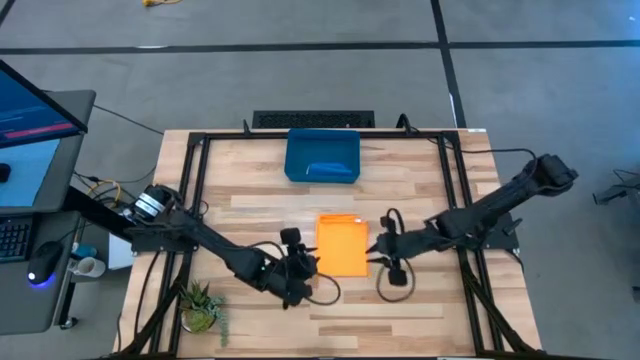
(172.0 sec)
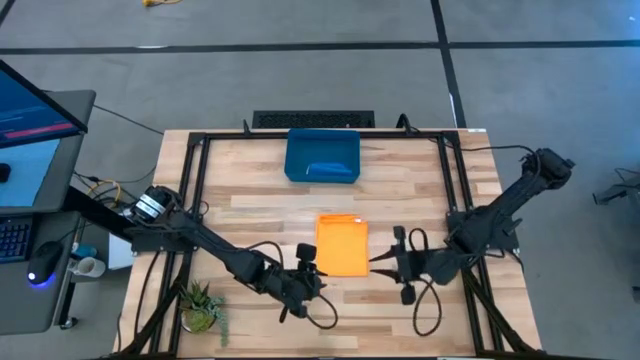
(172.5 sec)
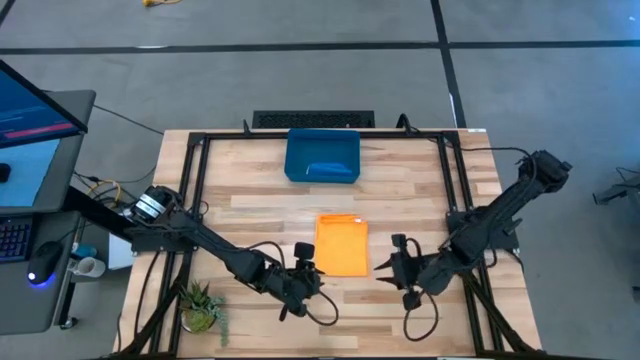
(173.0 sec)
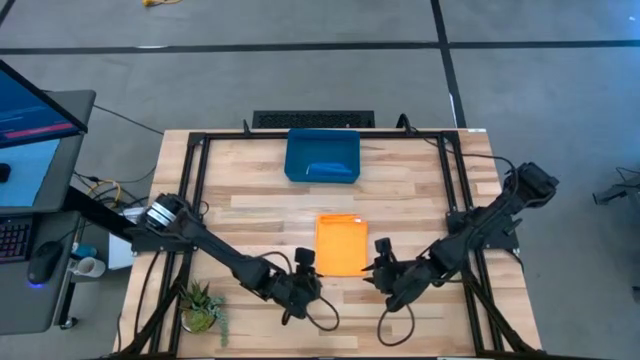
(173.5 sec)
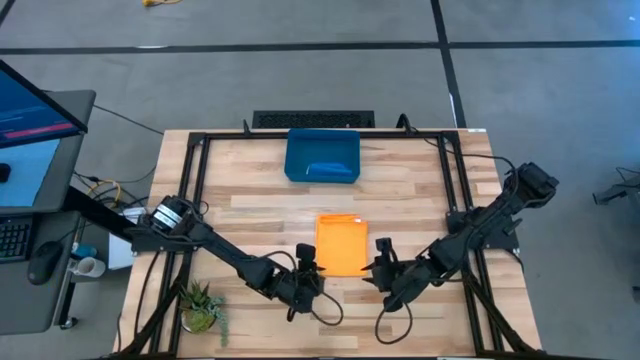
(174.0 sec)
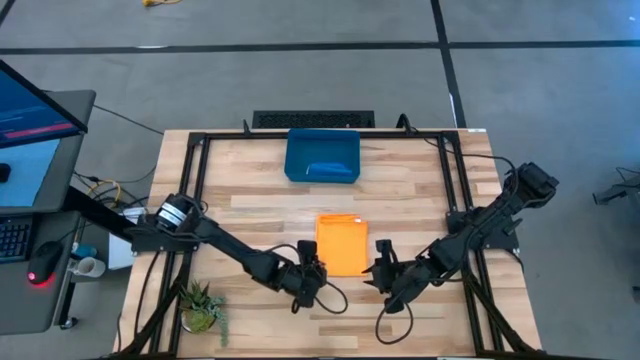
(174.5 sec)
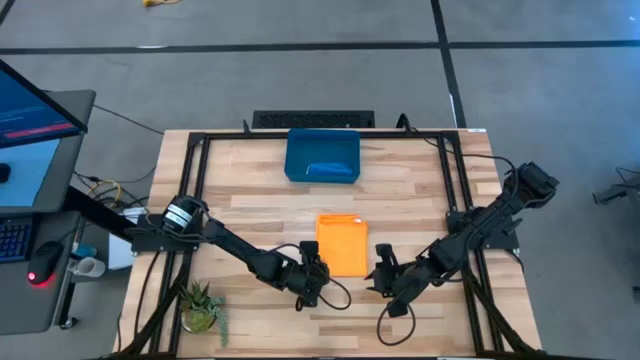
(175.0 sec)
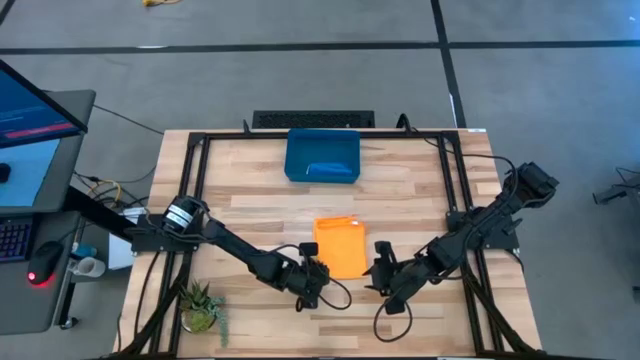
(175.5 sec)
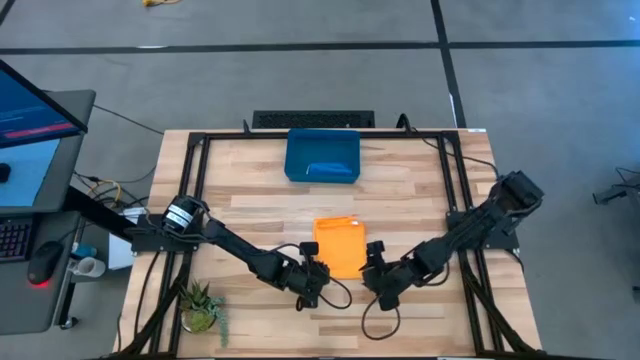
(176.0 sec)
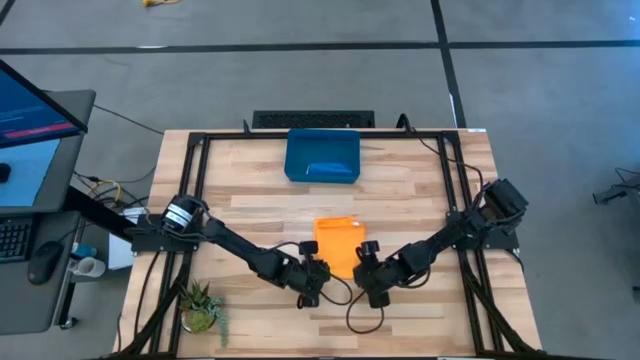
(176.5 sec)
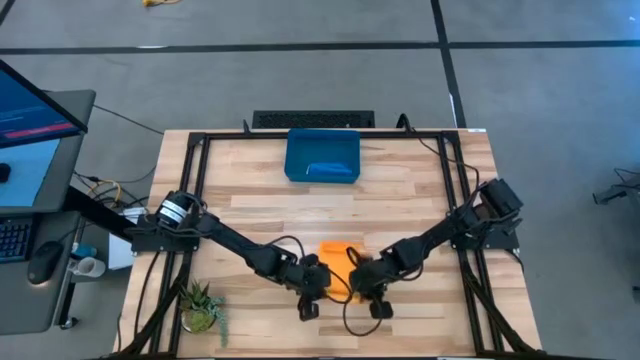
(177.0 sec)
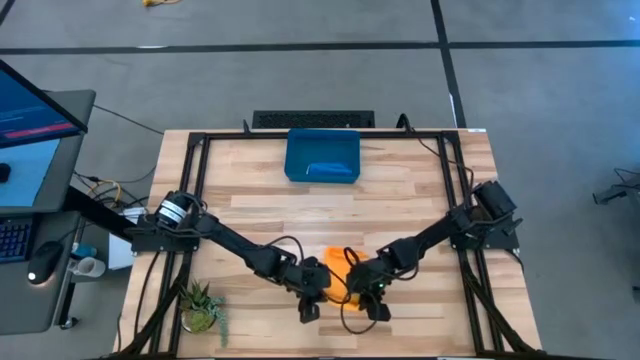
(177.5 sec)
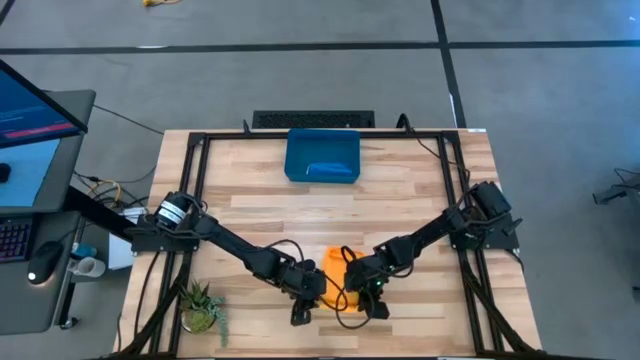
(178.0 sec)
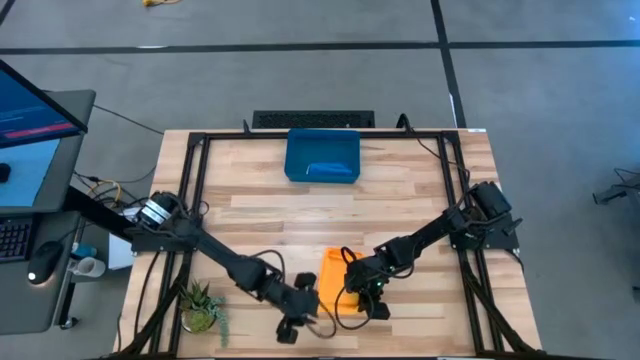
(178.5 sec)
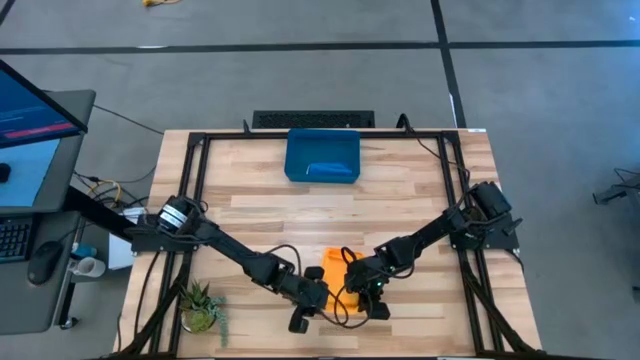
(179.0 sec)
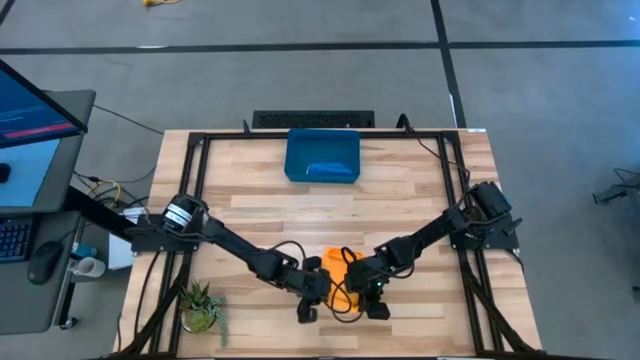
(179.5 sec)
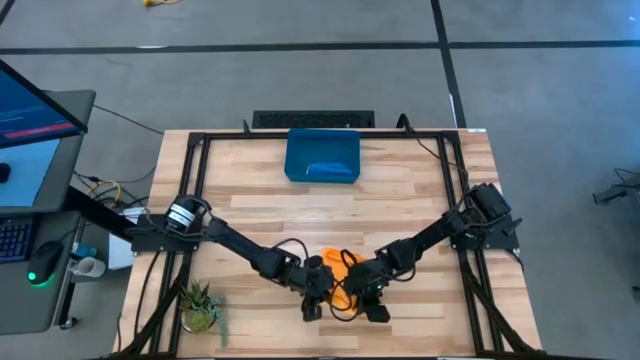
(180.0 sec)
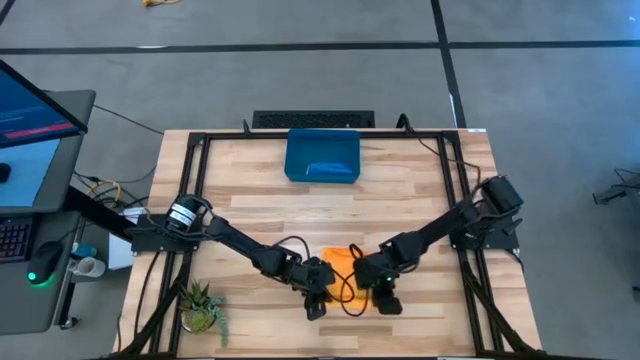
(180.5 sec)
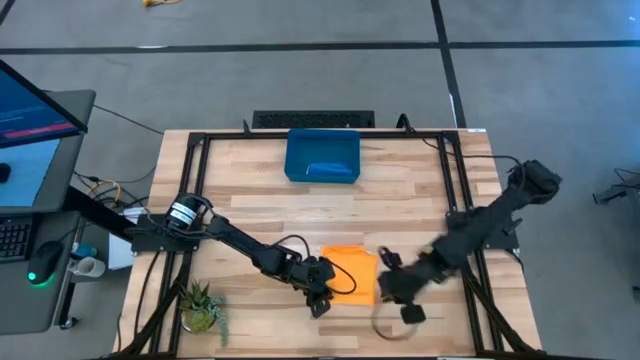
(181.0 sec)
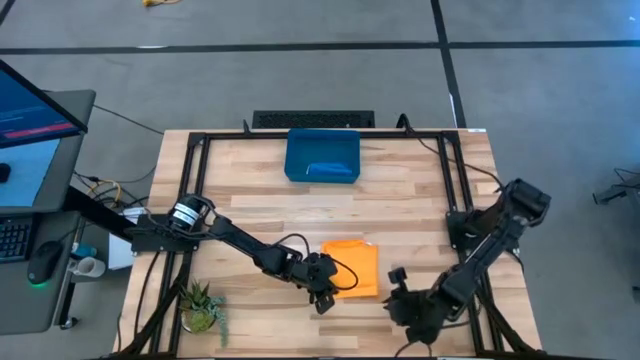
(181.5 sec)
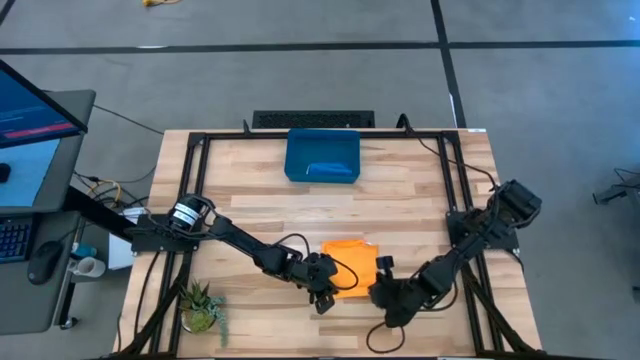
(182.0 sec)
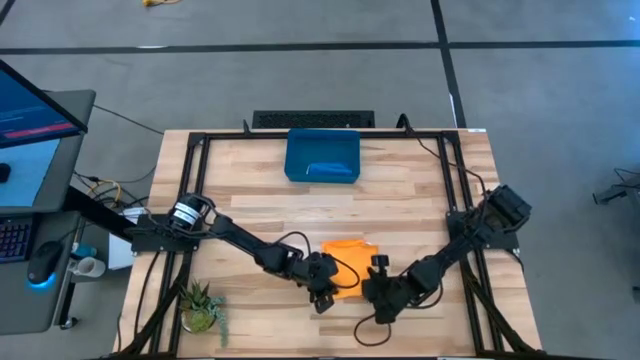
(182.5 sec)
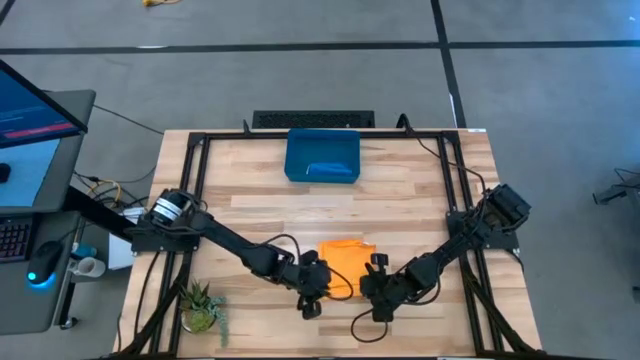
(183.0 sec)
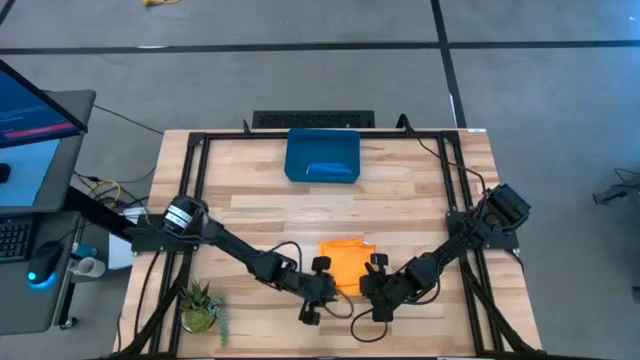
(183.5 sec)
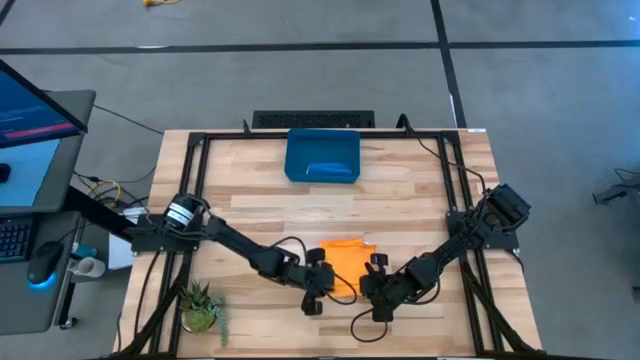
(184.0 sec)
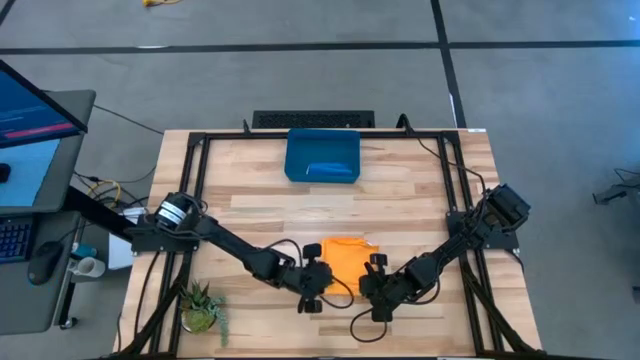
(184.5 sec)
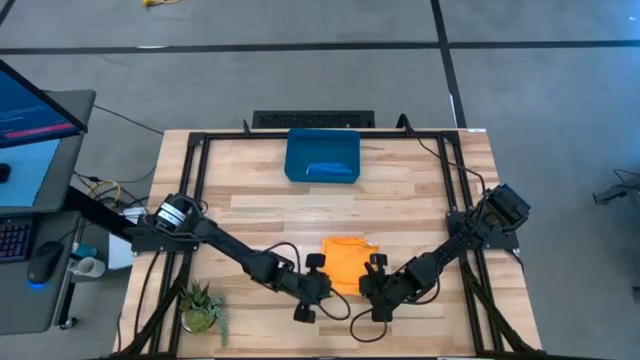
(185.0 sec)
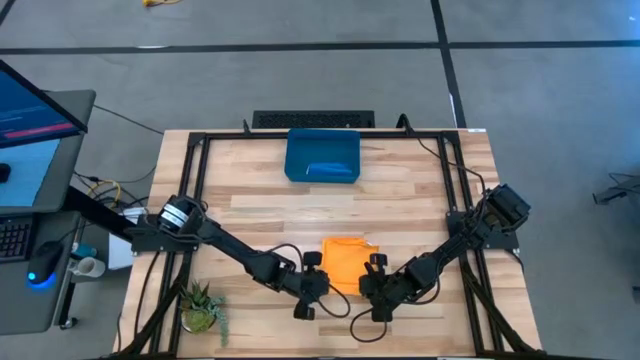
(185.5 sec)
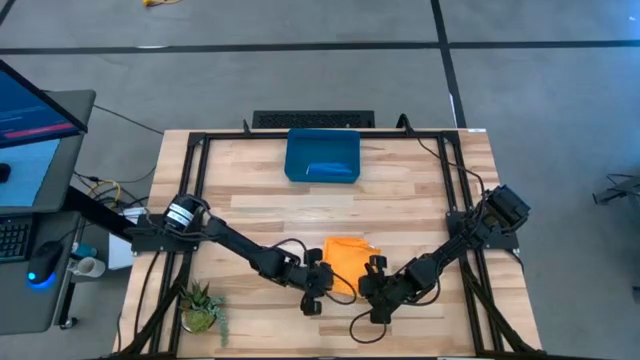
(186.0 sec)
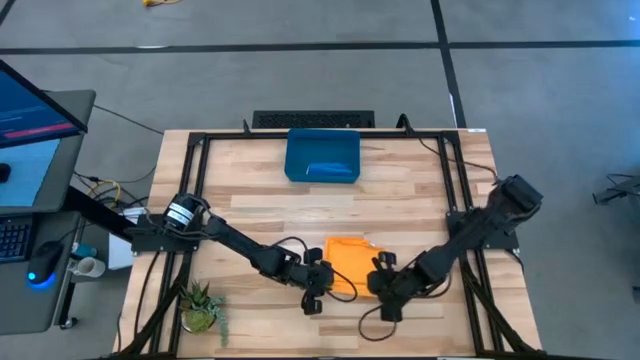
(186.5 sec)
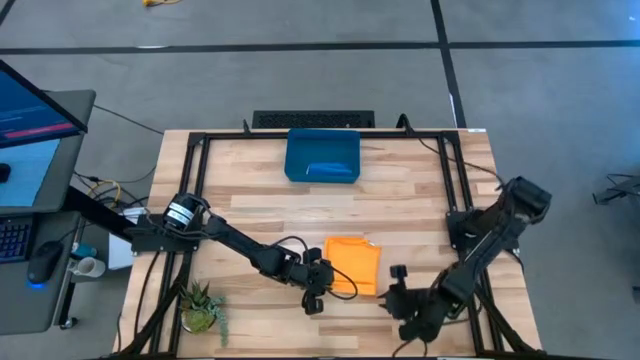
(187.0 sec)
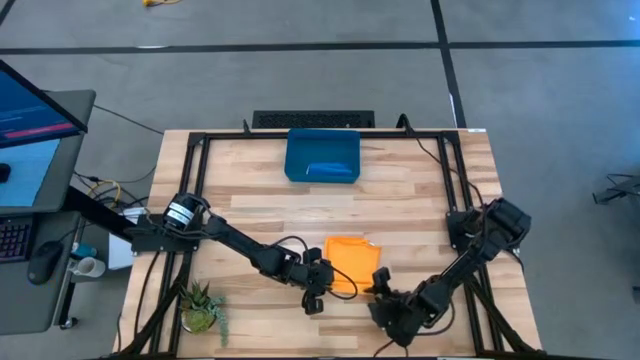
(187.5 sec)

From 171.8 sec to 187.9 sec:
Task: Roll microfiber towels into tight, uniform cylinder then place into a basket
Roll the orange microfiber towel
